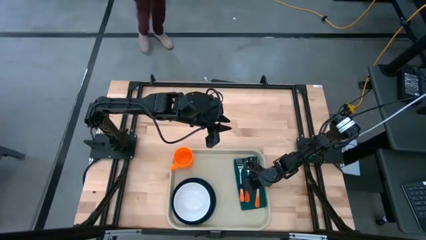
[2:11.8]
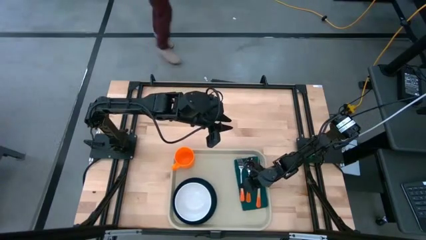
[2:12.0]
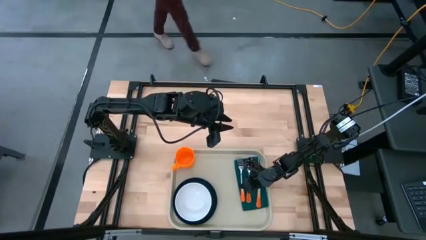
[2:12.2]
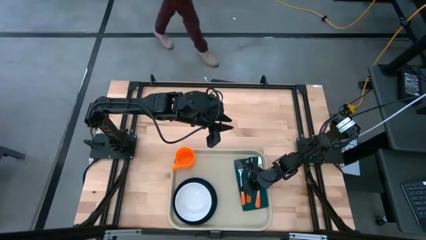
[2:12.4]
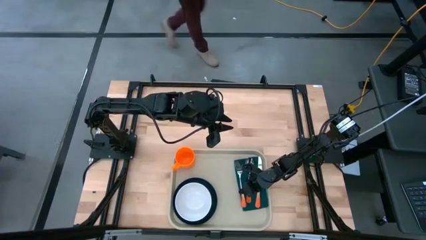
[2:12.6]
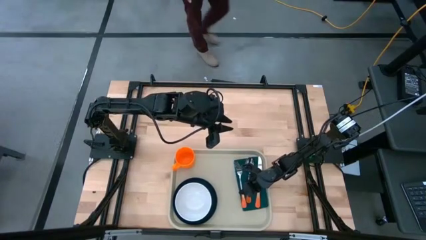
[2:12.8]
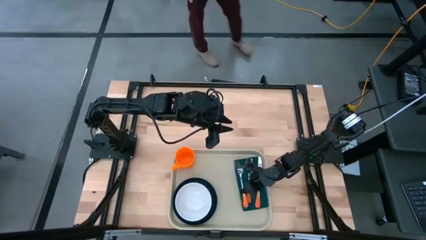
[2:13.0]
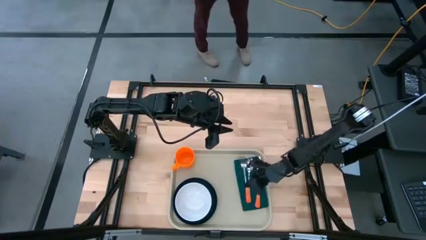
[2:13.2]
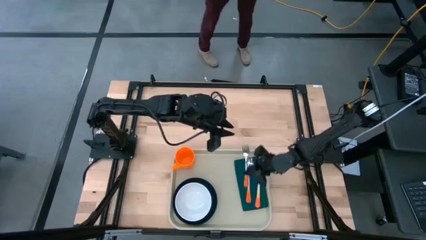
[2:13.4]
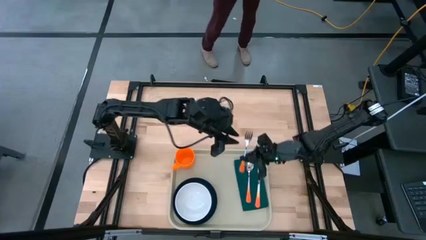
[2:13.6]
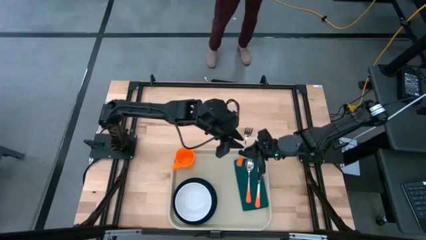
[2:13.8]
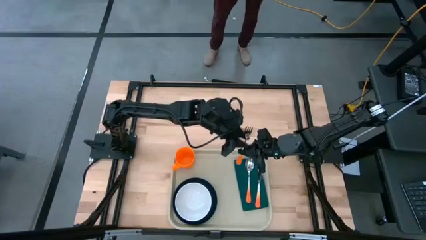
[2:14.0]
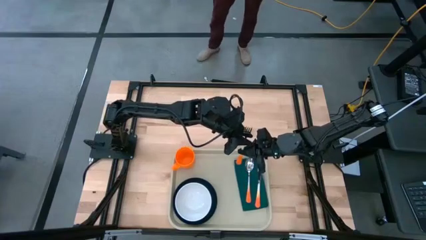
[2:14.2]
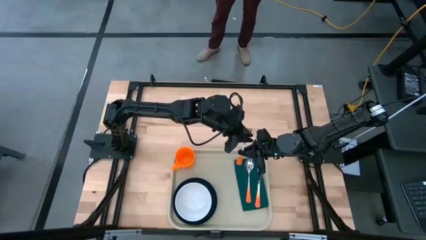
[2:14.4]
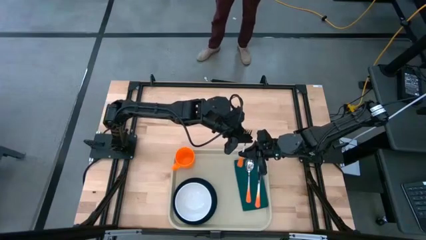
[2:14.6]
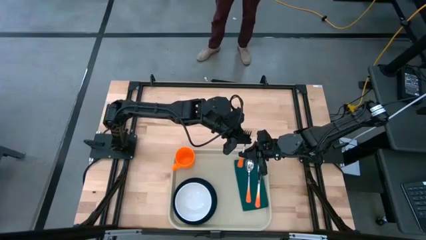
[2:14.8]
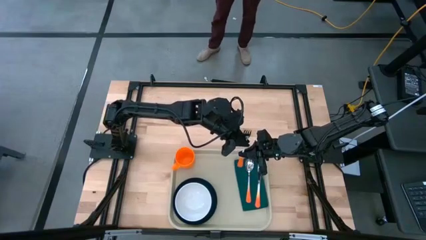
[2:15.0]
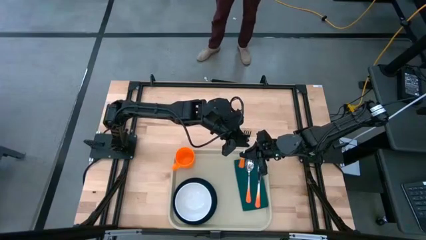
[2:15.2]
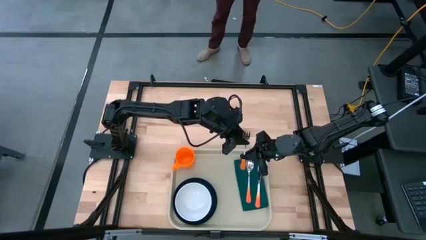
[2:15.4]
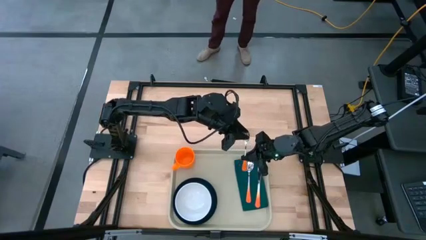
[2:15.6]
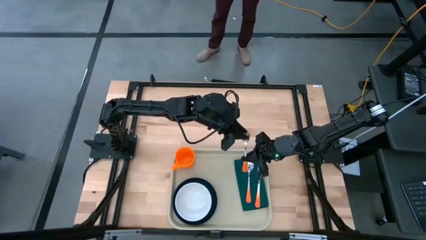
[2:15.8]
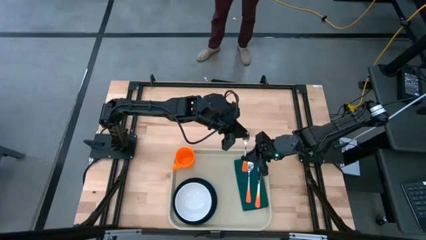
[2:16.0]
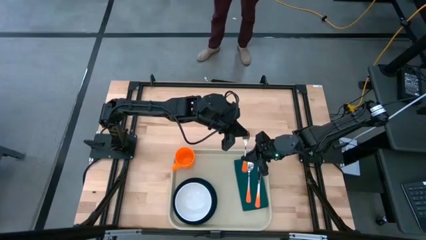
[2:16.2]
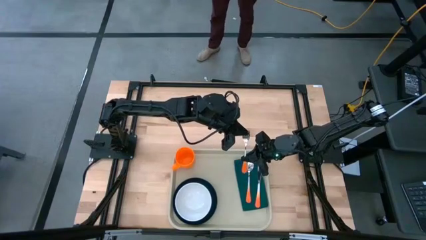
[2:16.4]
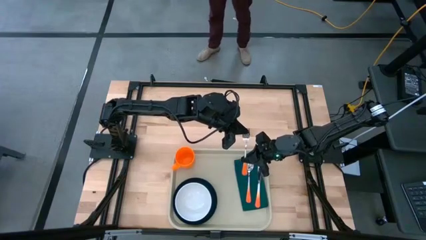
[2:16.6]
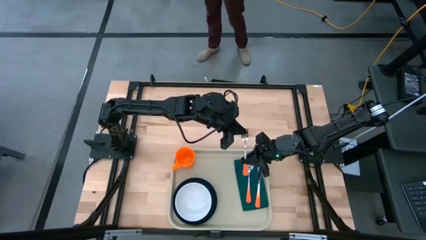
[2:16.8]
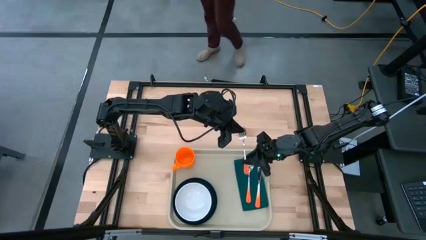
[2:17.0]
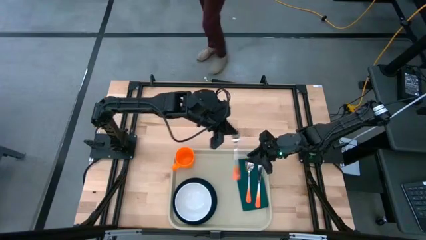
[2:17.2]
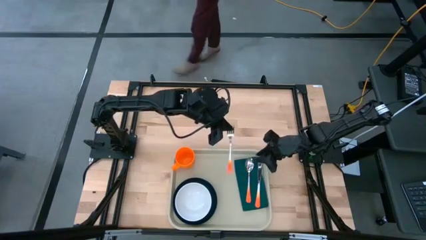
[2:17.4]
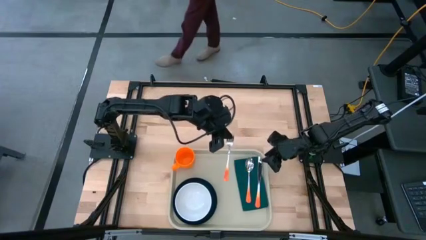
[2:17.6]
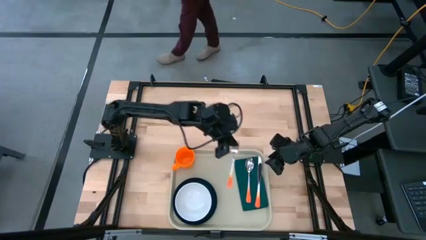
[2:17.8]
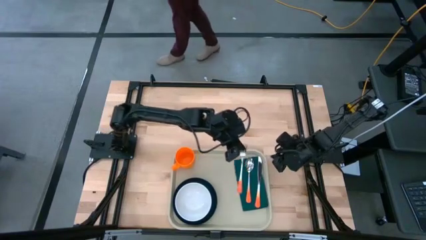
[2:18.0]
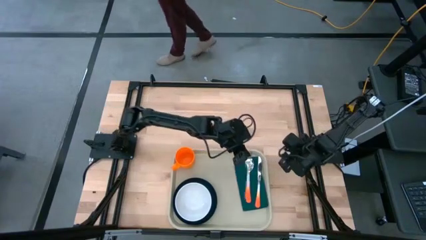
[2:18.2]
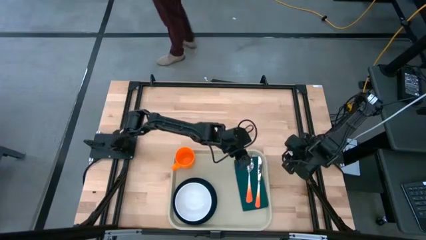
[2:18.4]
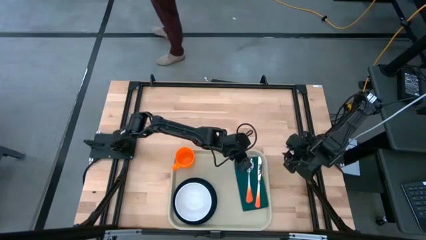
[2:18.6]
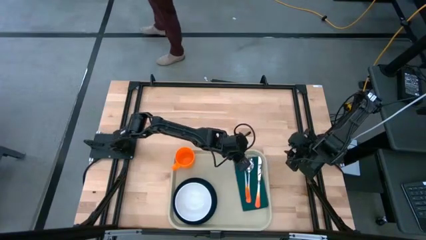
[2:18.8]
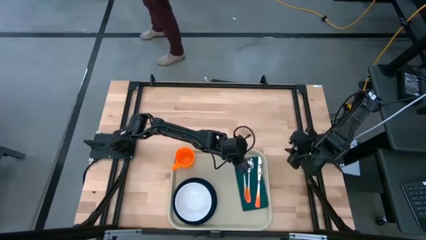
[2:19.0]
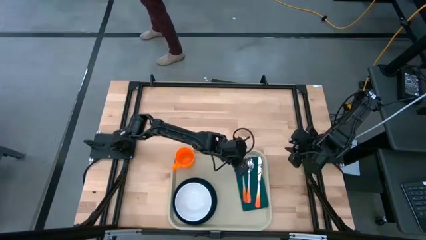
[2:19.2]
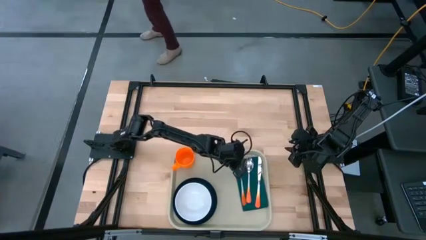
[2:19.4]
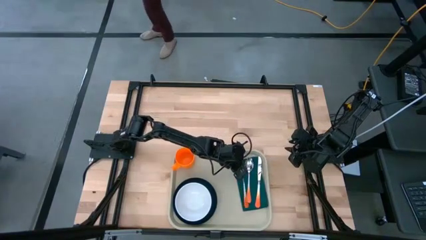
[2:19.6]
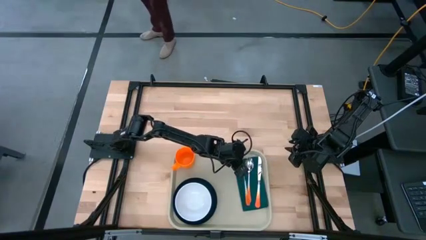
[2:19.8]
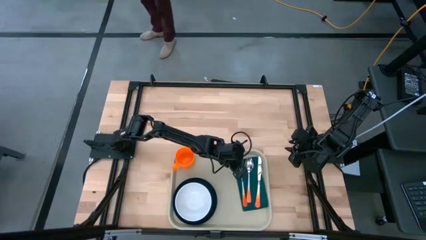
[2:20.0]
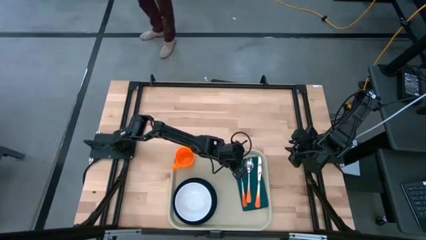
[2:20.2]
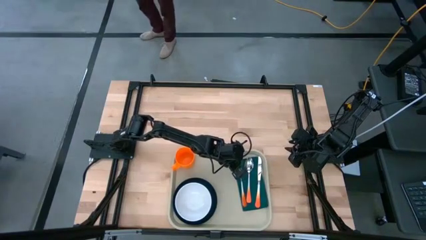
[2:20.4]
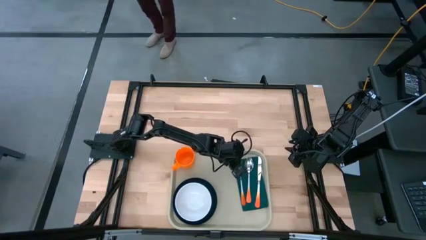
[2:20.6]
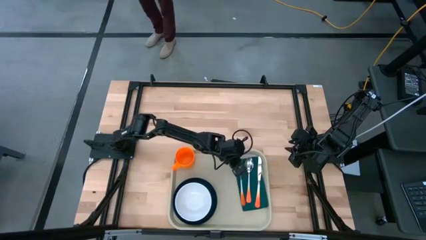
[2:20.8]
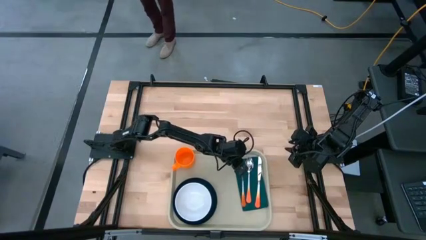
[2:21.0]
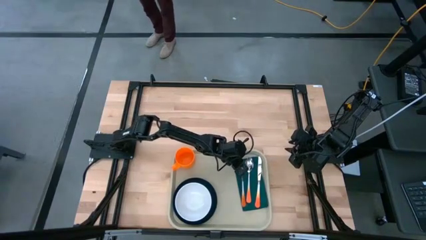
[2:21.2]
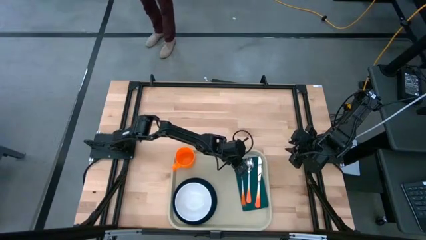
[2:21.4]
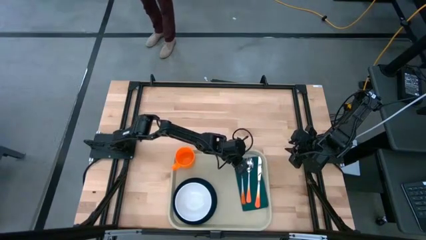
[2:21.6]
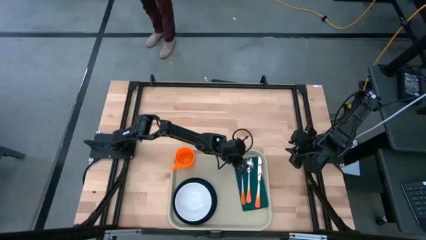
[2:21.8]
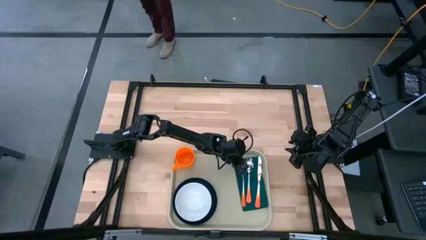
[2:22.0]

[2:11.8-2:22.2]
Task: Set up tray
Put the orange fork on the green napkin to the left of the orange spoon

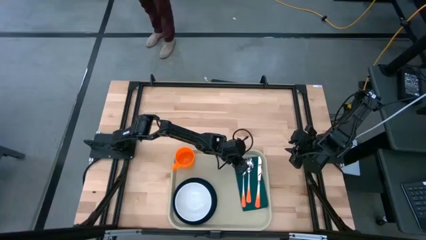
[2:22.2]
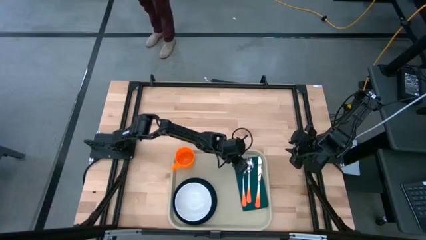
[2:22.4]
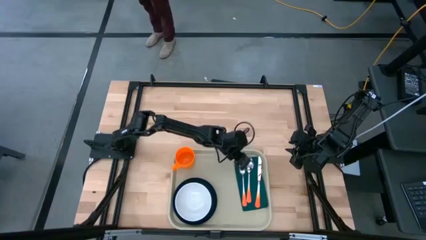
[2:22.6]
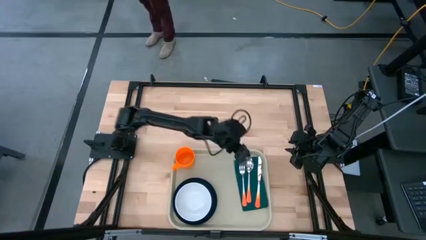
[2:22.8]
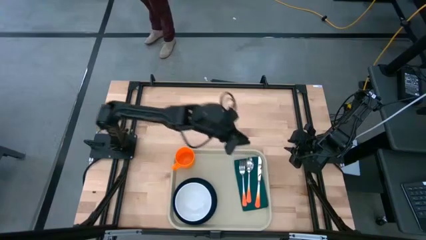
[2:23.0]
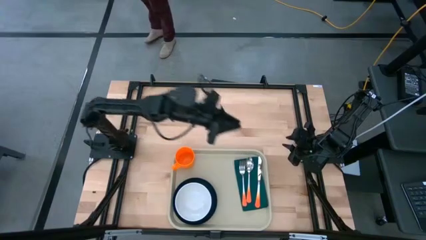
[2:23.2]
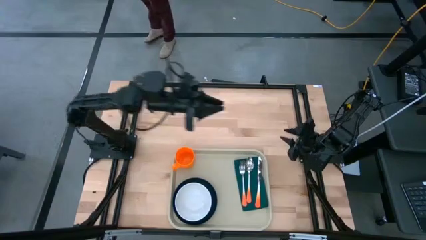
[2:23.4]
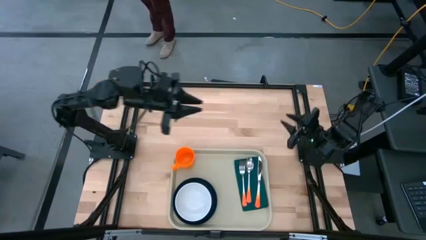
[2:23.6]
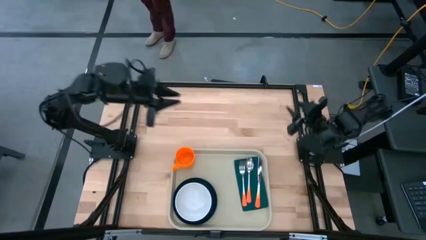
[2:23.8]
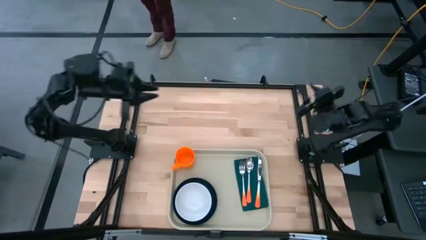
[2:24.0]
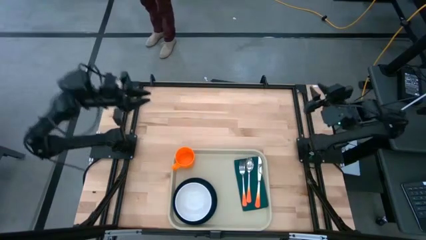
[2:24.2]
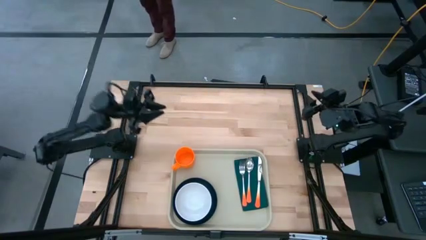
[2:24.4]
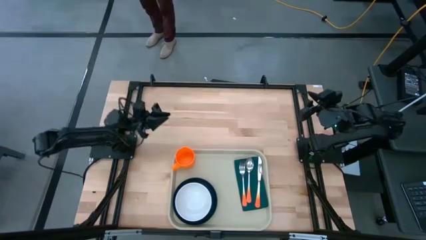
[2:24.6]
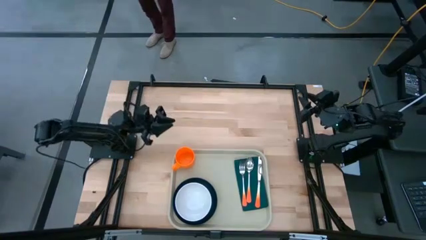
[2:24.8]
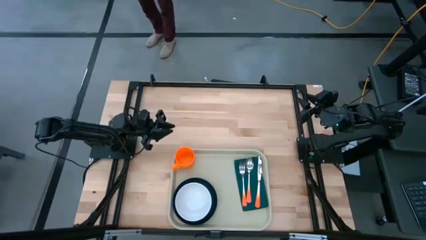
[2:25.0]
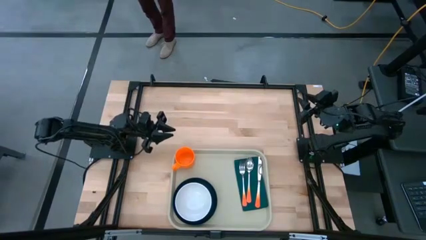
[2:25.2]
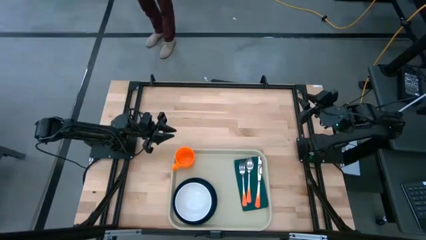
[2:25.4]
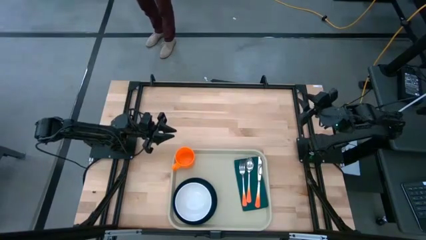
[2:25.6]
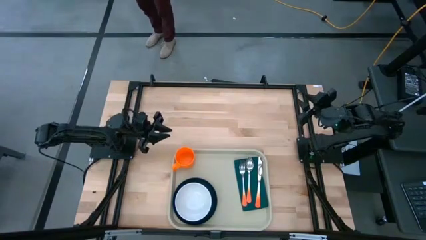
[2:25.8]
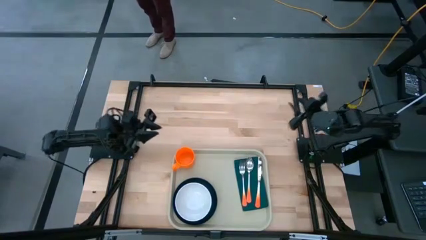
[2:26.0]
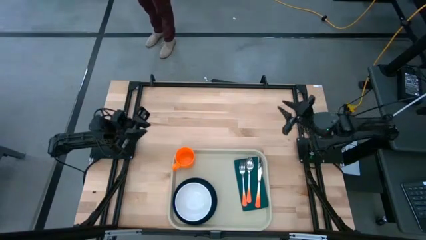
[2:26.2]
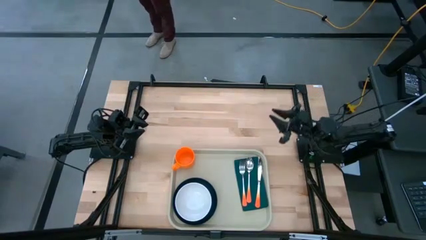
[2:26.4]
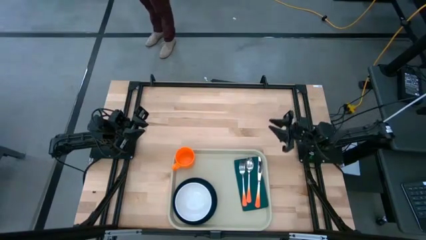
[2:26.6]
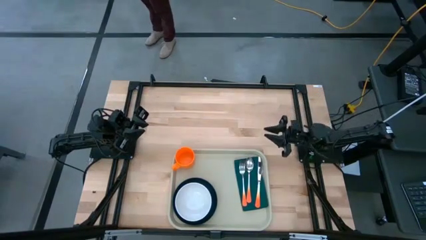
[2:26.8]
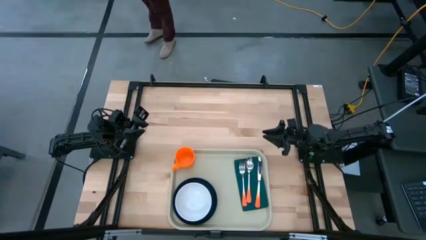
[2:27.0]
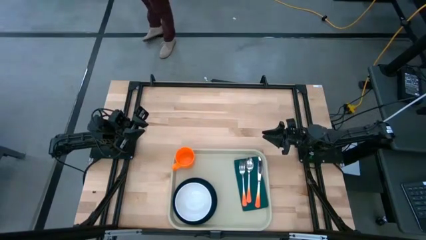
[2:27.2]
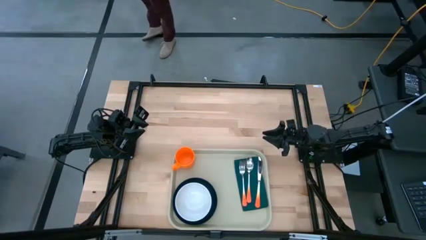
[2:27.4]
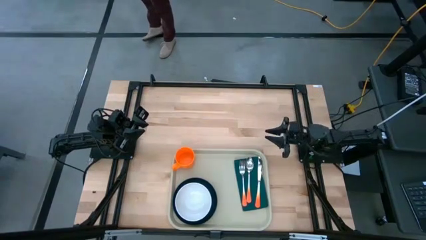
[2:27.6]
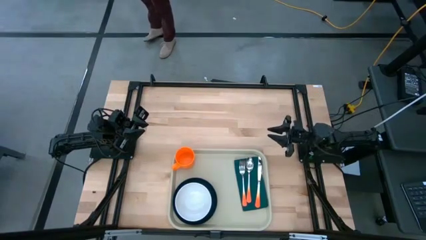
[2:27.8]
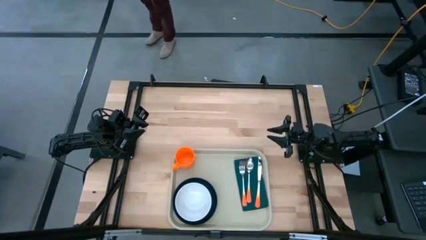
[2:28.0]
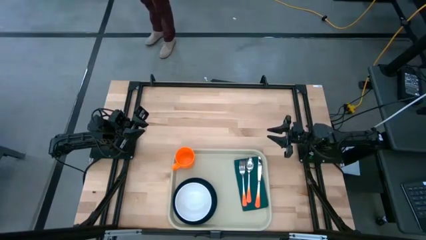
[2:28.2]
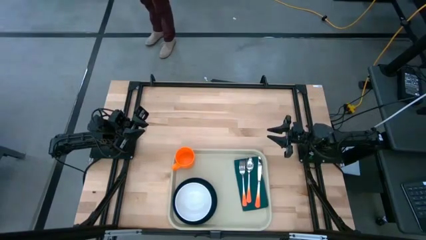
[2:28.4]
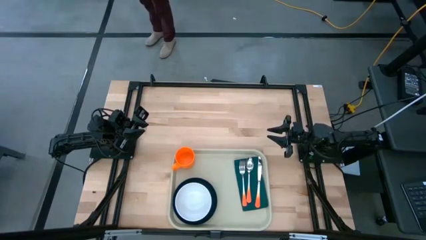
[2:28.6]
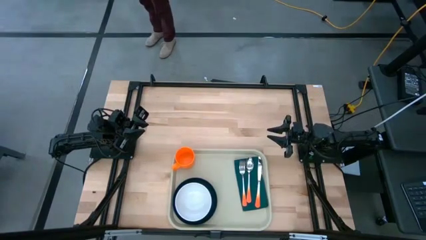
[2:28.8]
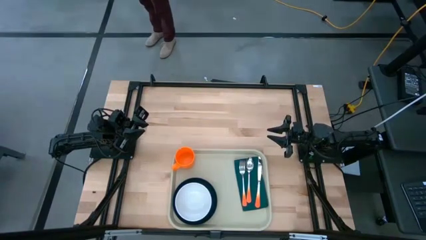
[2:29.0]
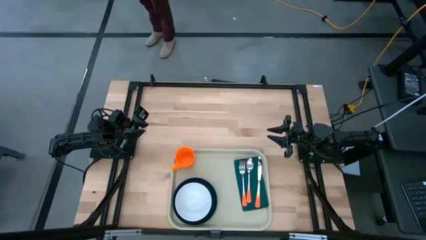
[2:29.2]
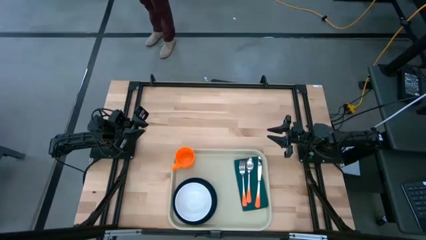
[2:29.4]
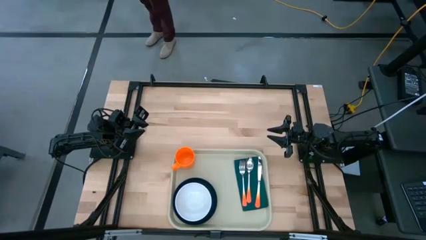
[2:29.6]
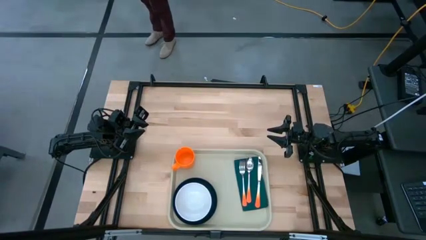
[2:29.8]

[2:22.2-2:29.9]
Return to Home Position
